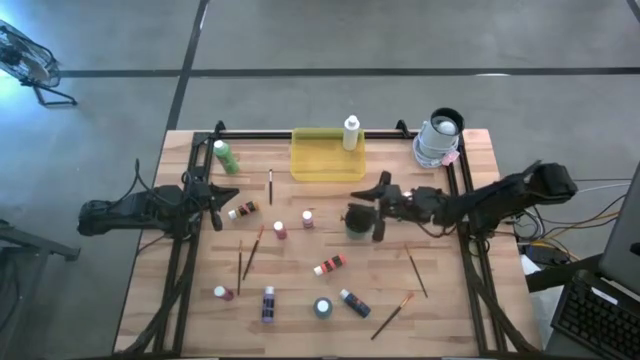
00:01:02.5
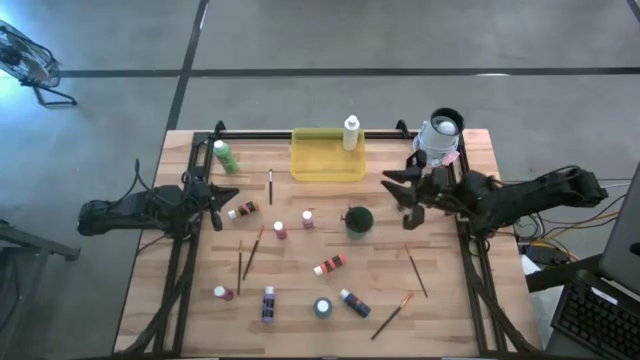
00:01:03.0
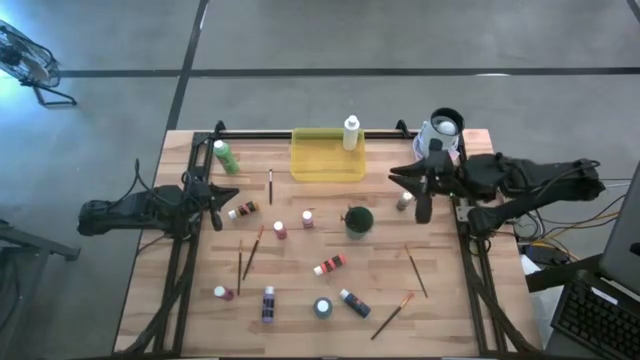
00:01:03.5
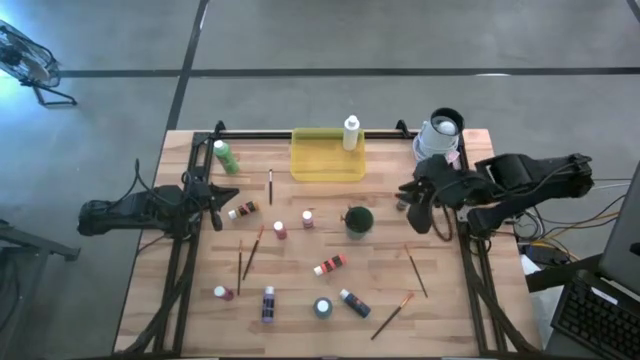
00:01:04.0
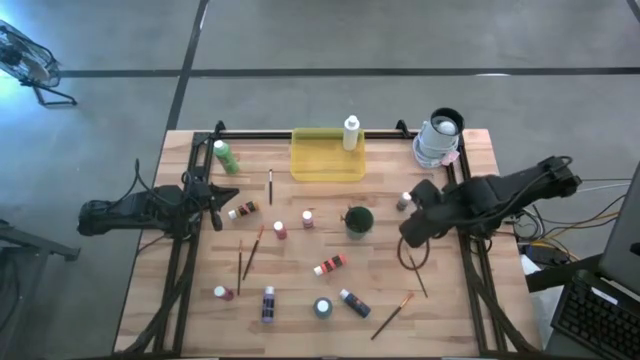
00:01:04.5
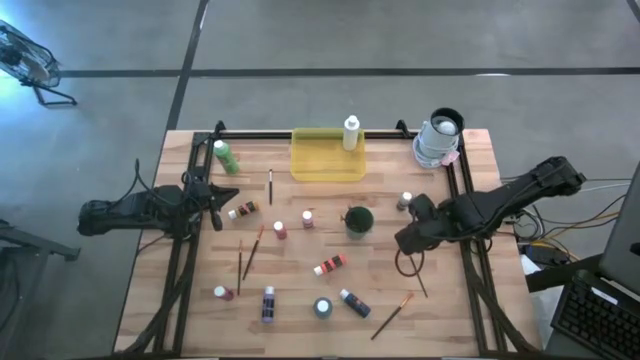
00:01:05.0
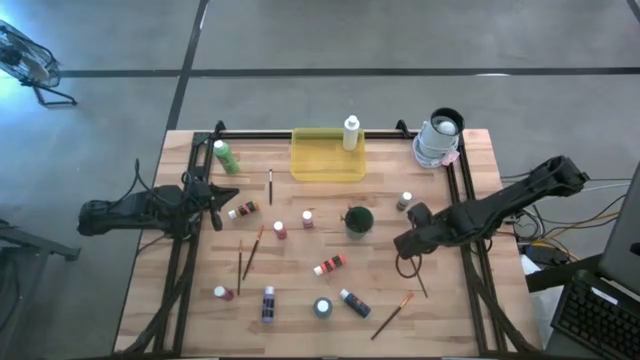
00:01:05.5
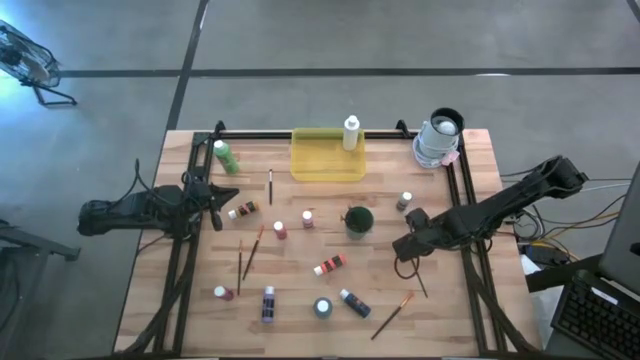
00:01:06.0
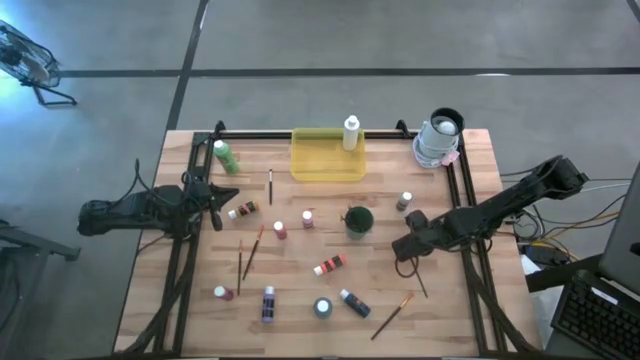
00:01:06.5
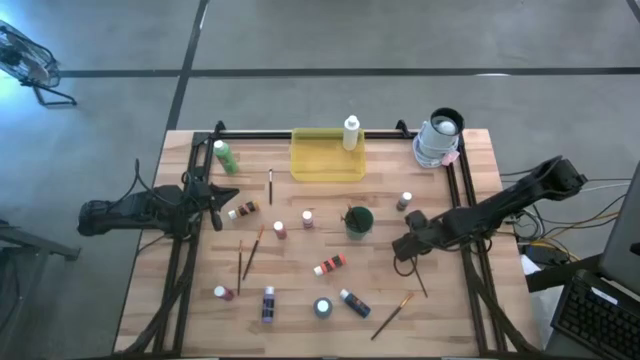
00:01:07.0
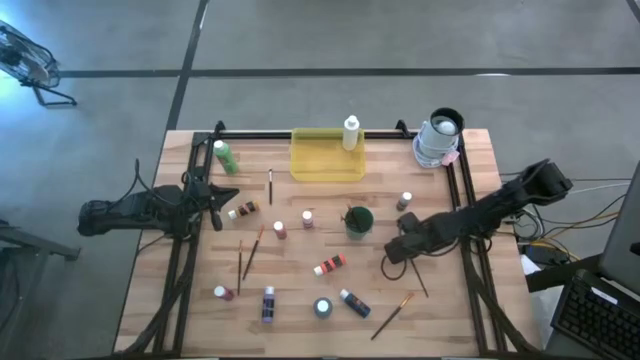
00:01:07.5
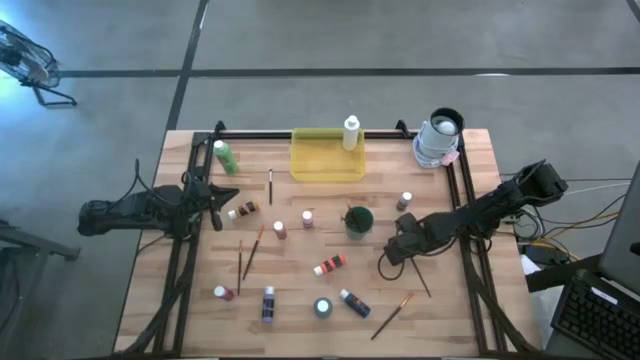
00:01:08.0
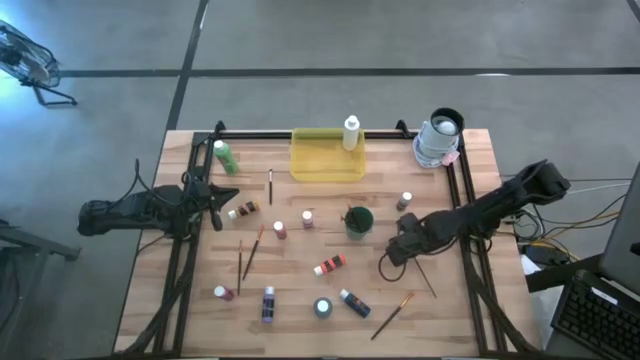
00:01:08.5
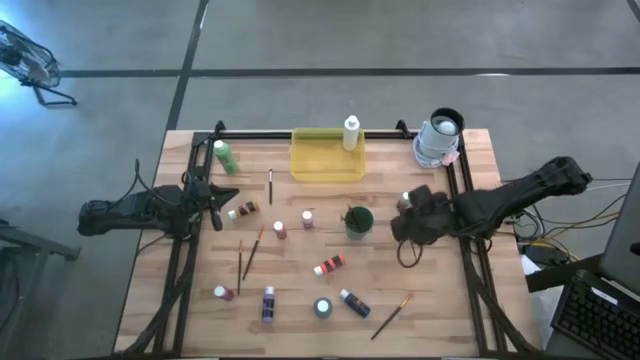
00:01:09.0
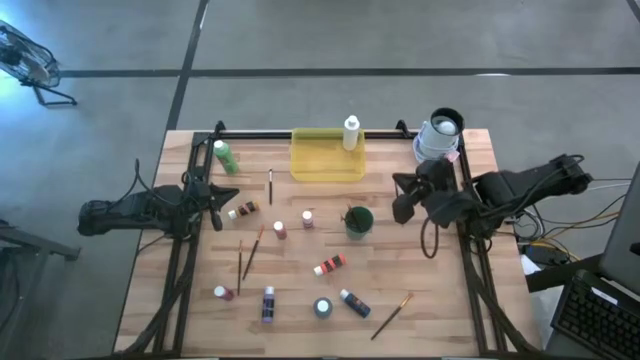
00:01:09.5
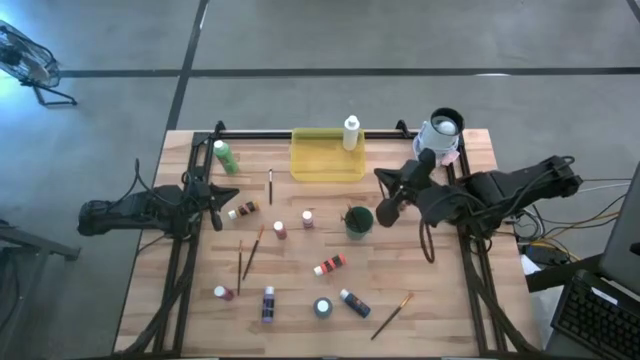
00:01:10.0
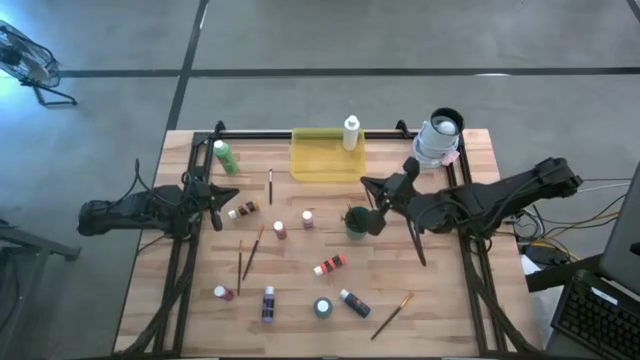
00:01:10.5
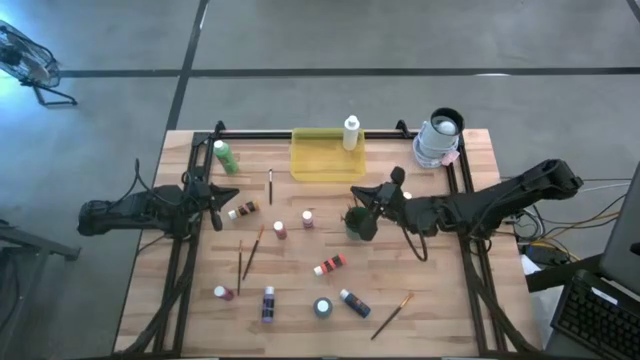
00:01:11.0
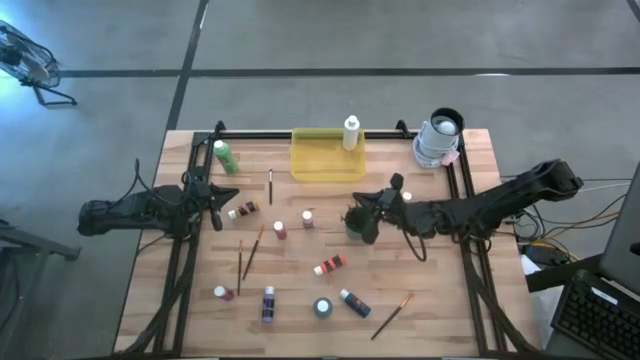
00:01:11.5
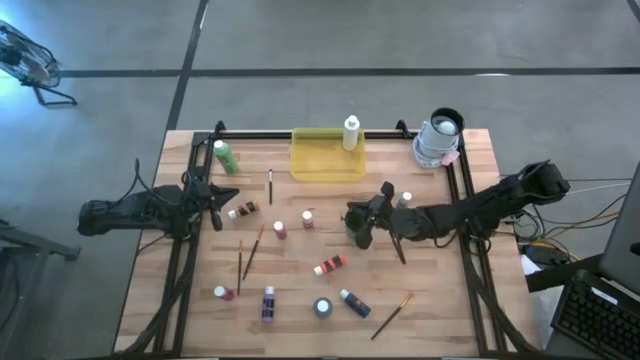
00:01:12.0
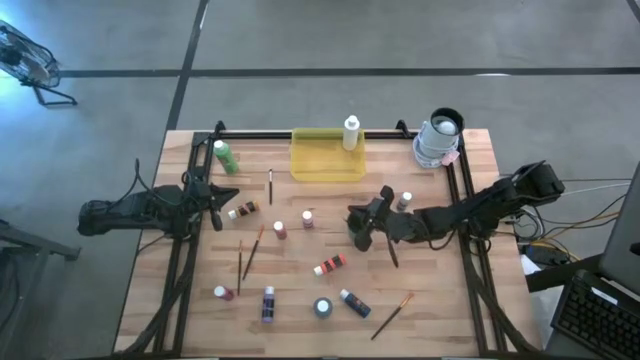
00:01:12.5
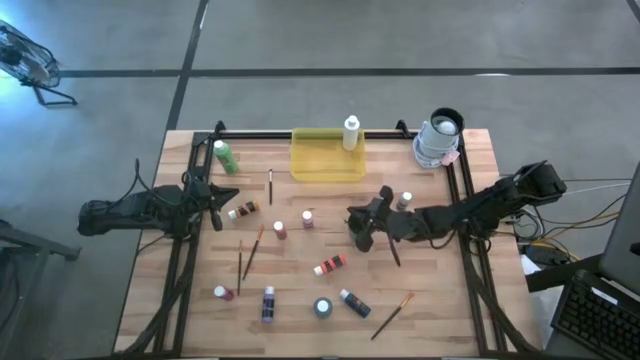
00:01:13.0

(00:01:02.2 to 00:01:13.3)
Task: Pick & Place Paint Supplies
Put the gold paint brush into the green cup

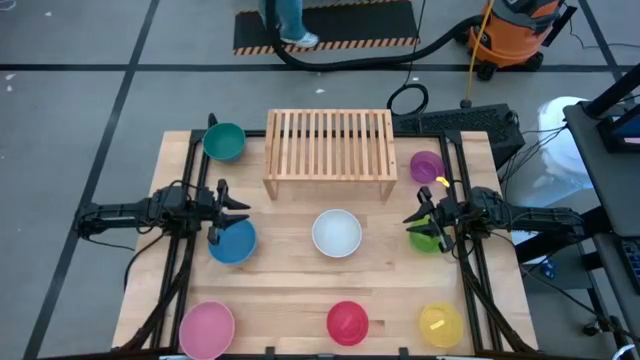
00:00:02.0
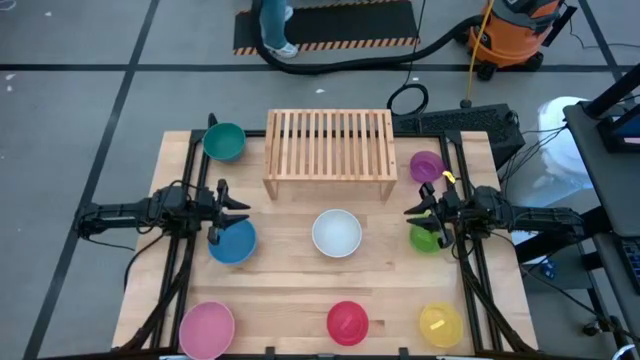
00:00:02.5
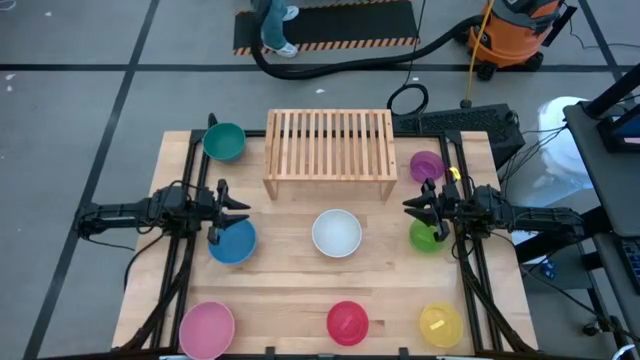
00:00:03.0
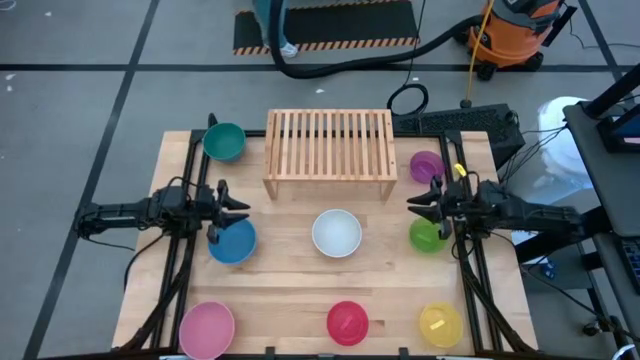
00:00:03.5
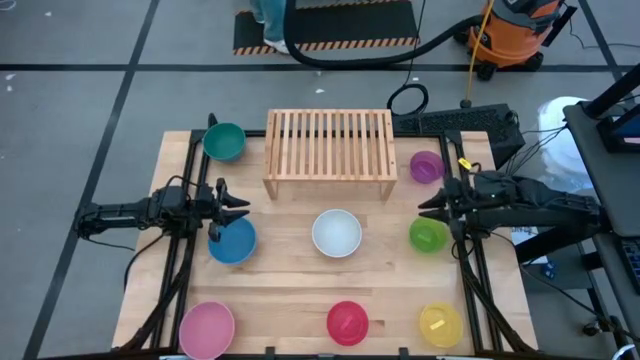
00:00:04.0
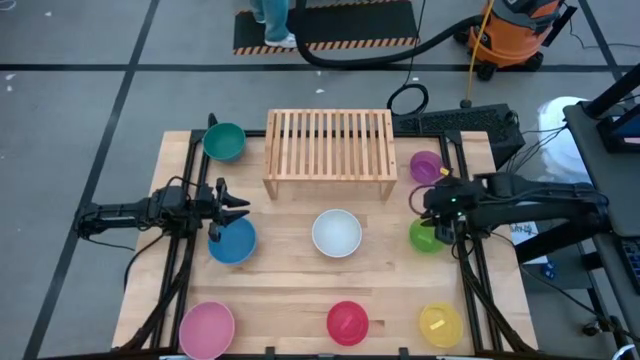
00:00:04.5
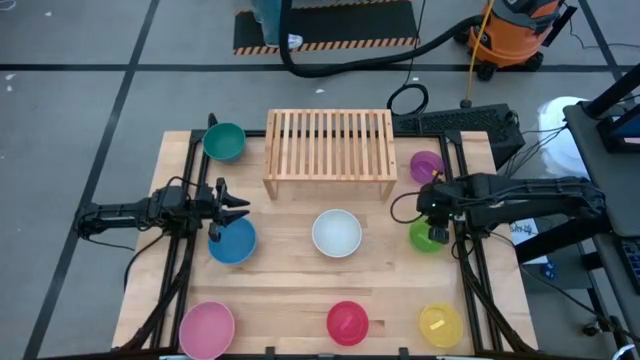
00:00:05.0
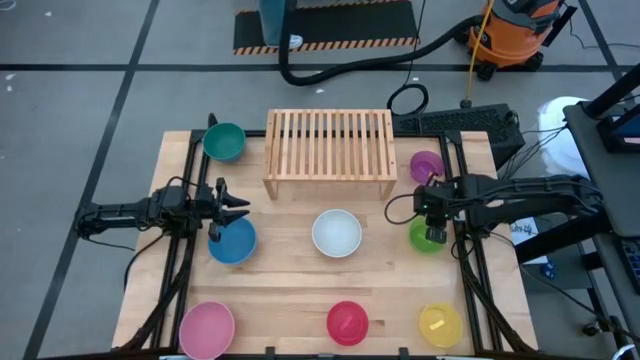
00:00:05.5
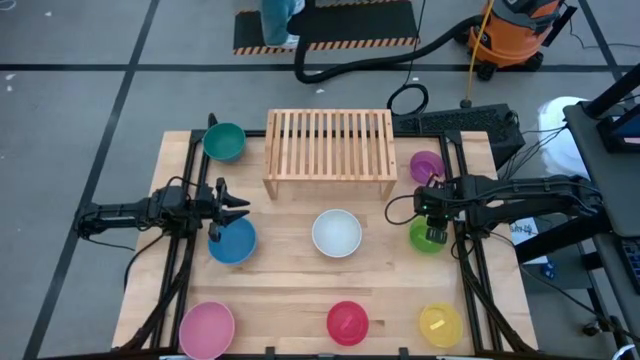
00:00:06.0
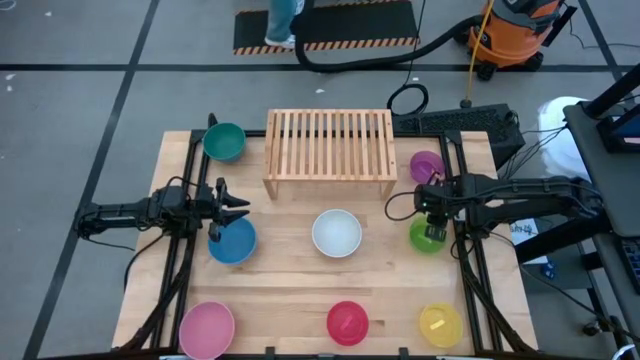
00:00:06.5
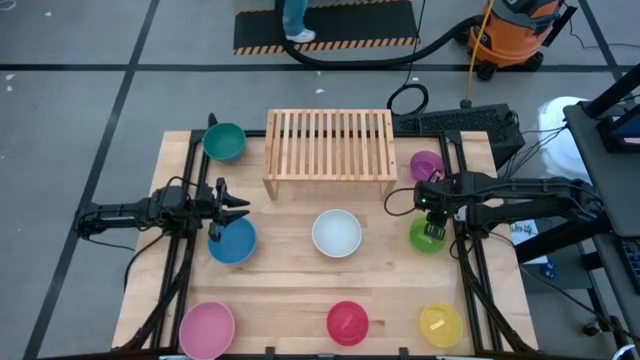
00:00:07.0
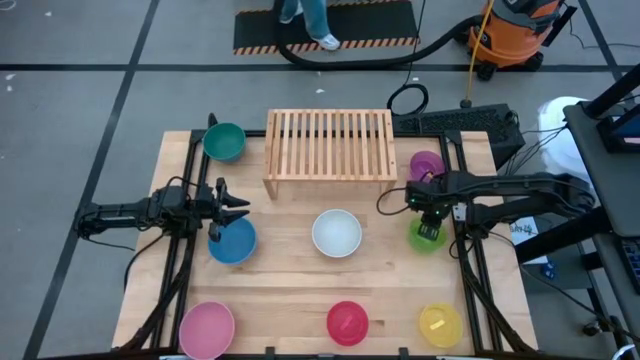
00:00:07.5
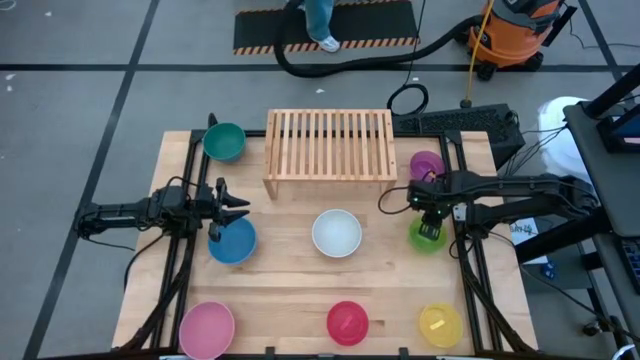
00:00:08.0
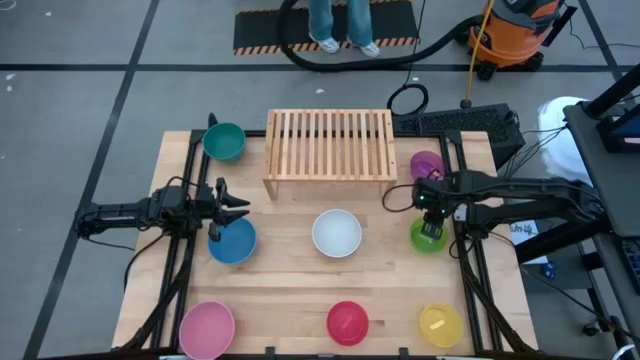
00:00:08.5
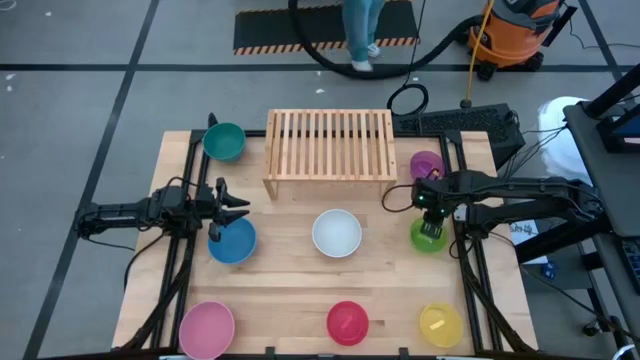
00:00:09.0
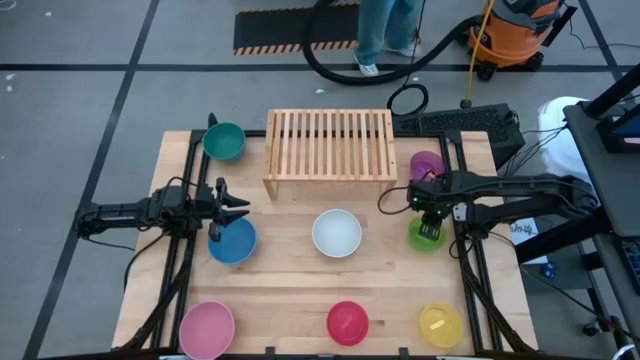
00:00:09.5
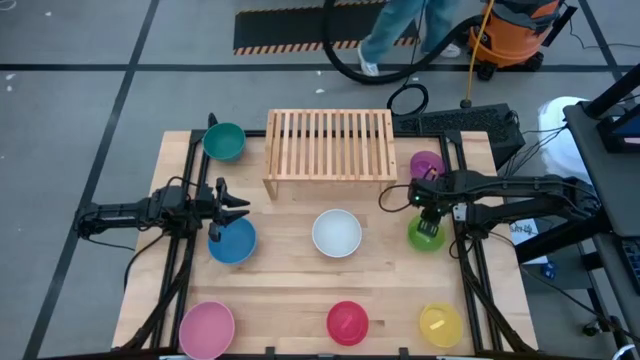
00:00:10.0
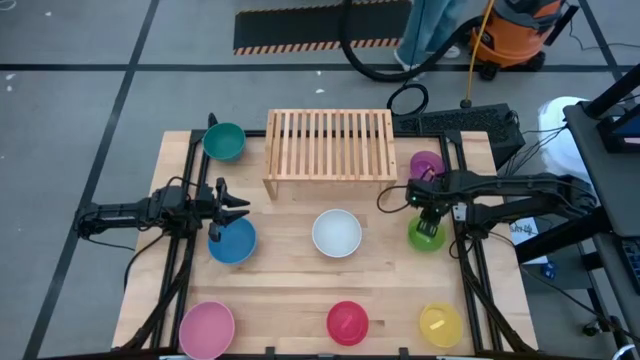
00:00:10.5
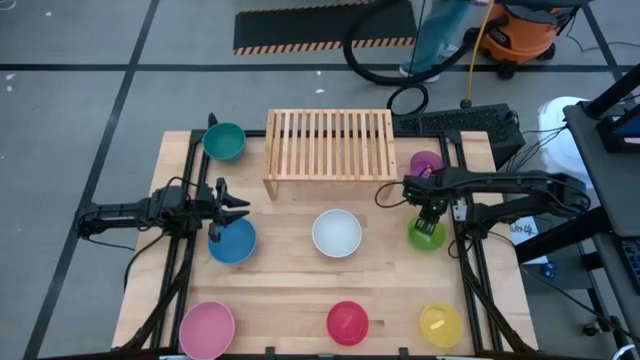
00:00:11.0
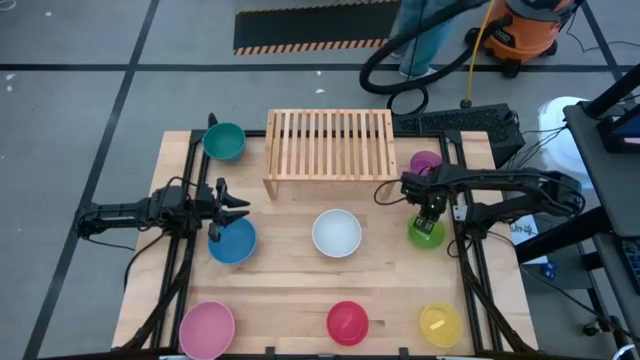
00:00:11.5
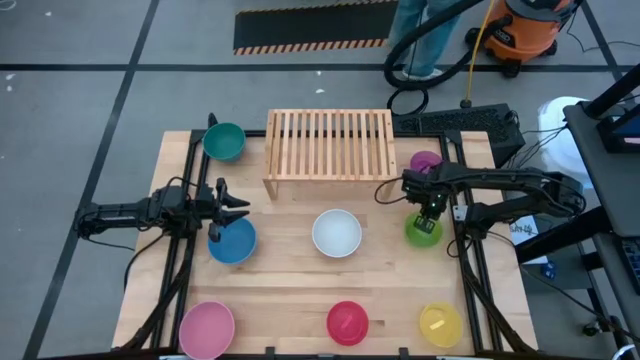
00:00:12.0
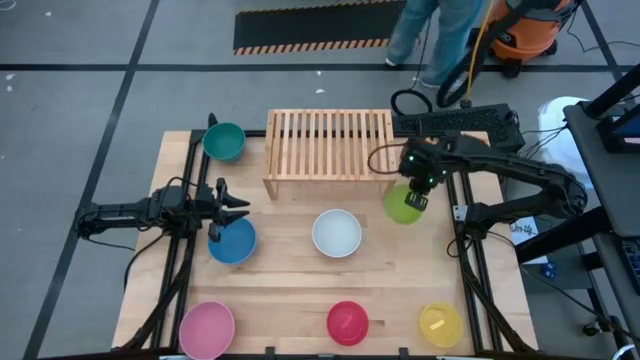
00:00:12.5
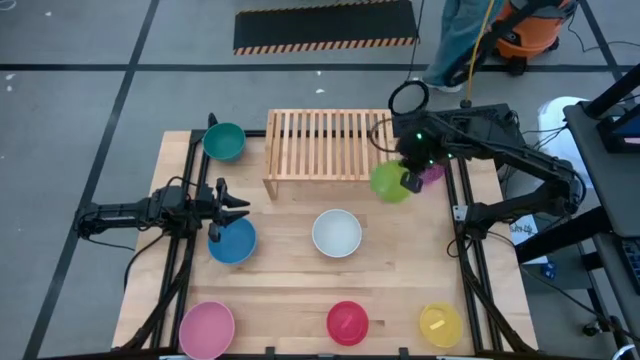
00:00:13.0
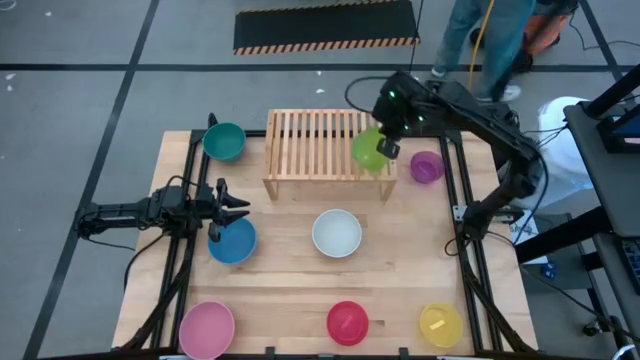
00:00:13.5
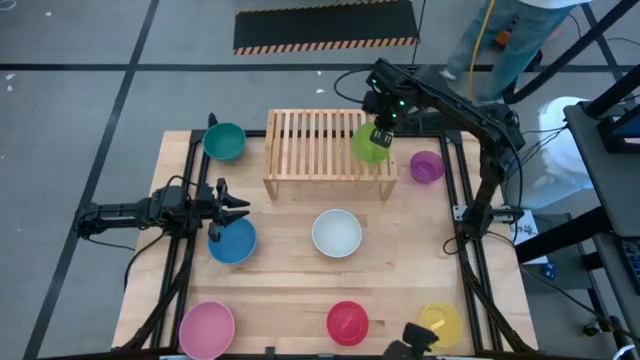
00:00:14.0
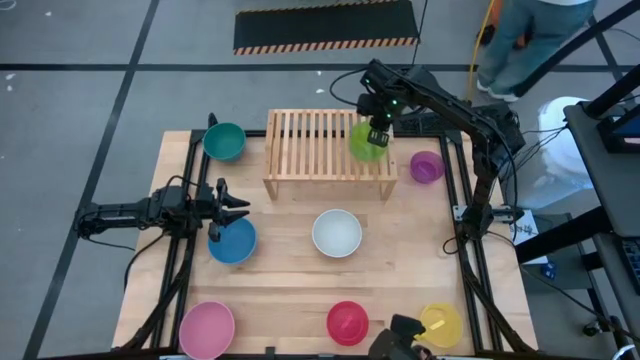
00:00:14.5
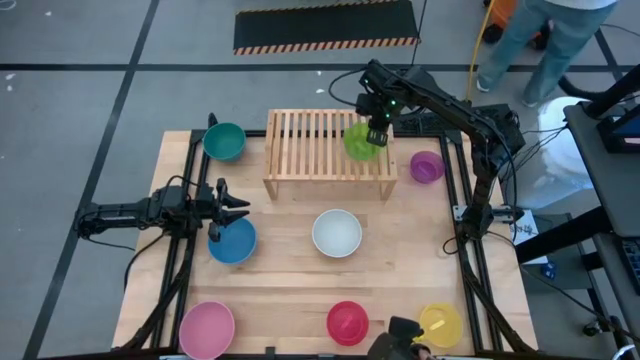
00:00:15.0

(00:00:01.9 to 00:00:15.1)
Task: Place and stack bowls onto a shelf
Put the light green bowl on the shelf
